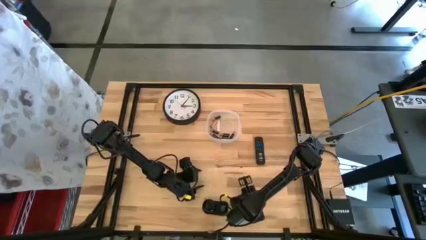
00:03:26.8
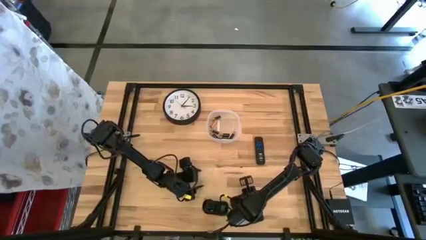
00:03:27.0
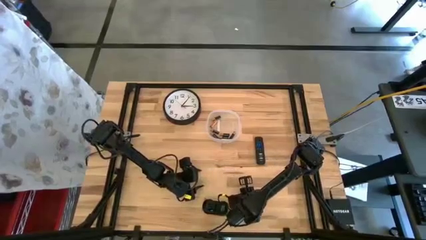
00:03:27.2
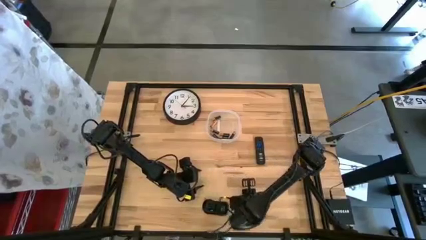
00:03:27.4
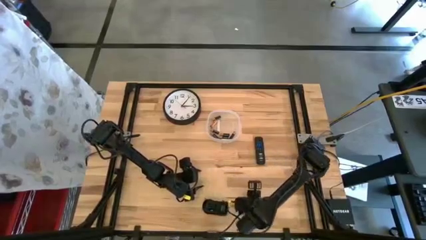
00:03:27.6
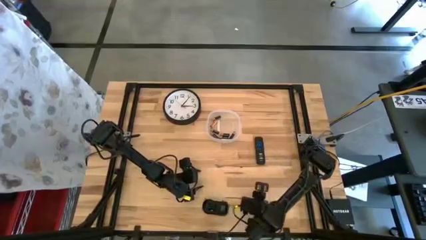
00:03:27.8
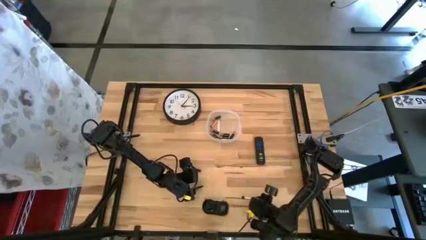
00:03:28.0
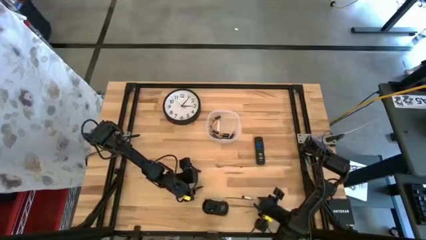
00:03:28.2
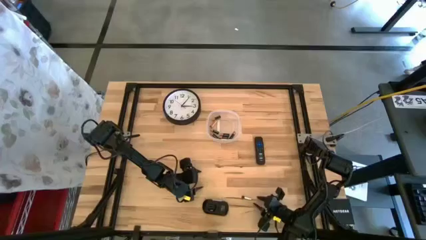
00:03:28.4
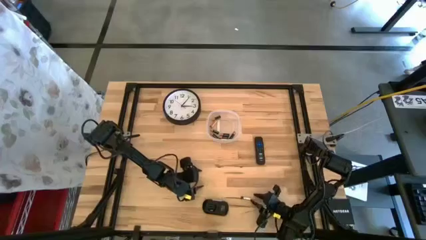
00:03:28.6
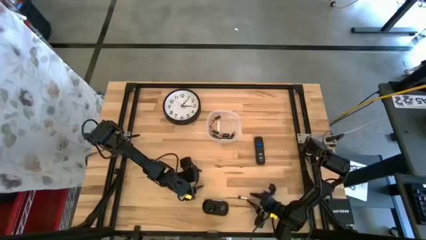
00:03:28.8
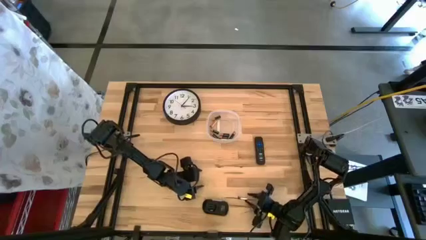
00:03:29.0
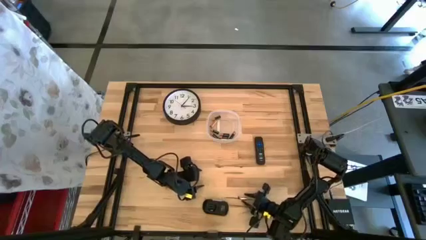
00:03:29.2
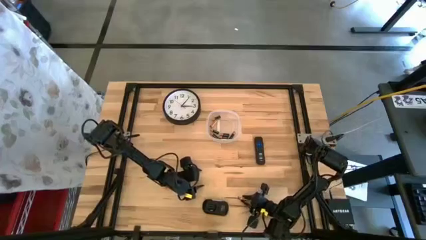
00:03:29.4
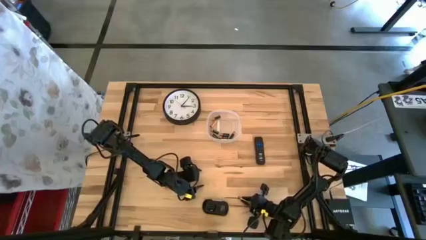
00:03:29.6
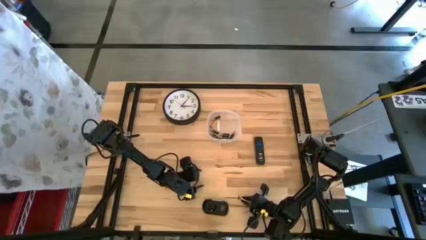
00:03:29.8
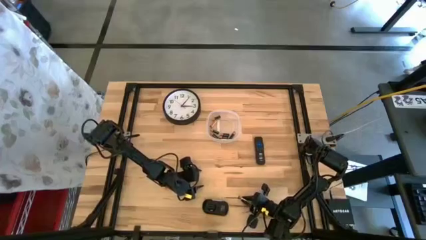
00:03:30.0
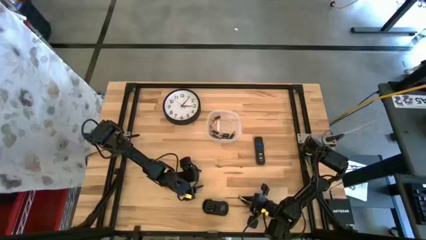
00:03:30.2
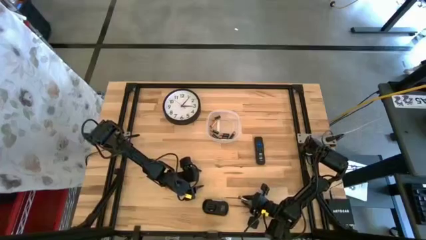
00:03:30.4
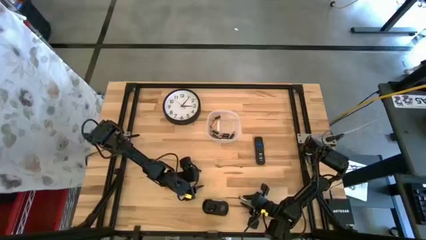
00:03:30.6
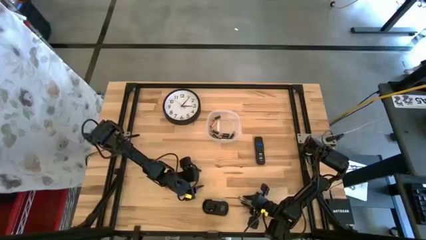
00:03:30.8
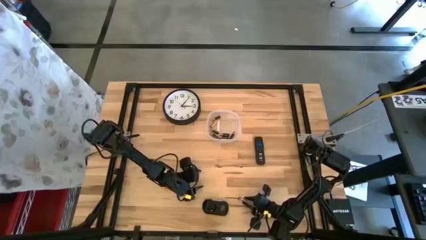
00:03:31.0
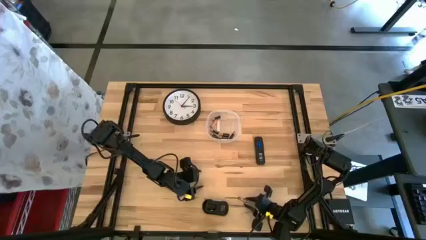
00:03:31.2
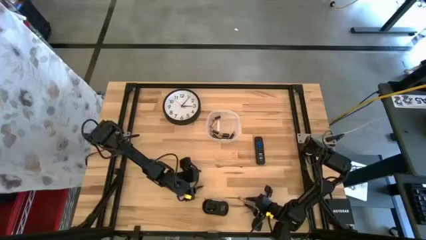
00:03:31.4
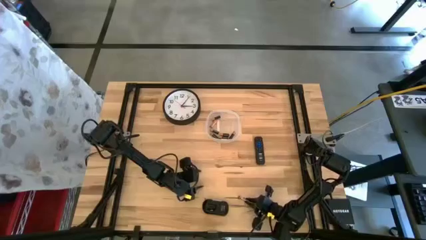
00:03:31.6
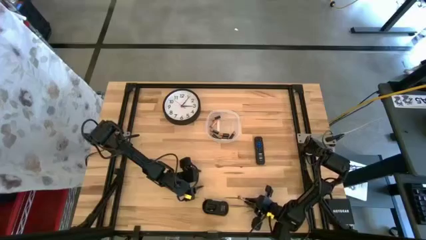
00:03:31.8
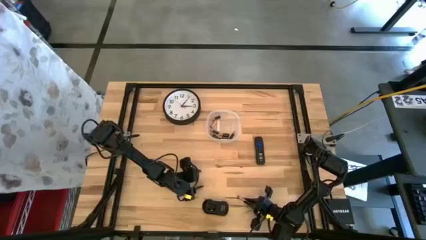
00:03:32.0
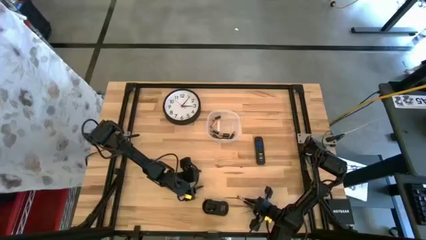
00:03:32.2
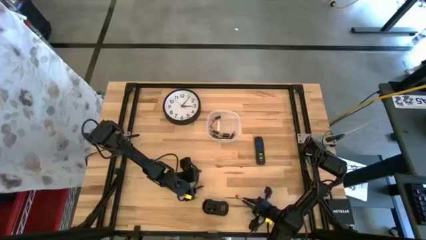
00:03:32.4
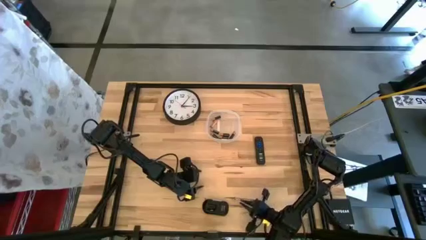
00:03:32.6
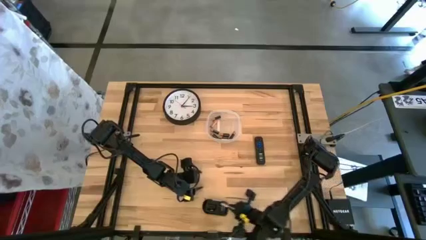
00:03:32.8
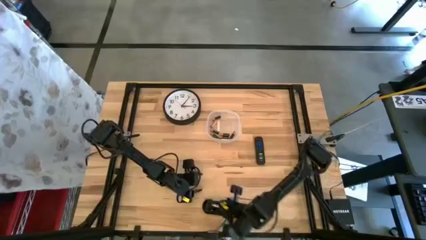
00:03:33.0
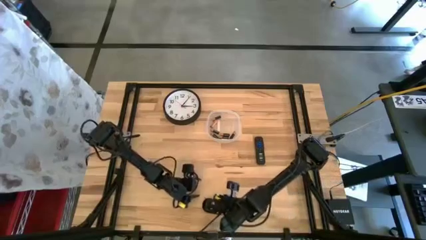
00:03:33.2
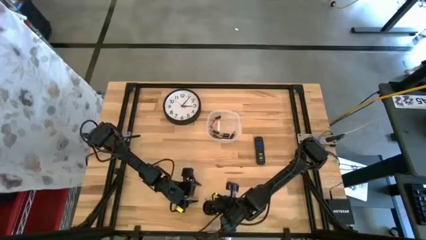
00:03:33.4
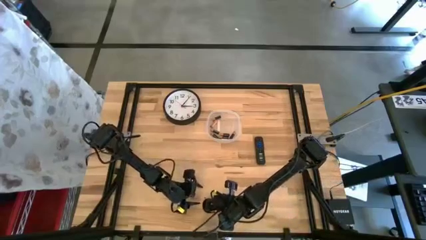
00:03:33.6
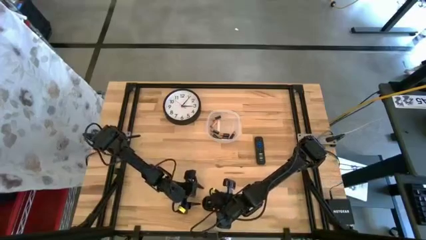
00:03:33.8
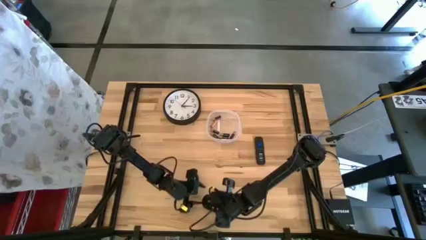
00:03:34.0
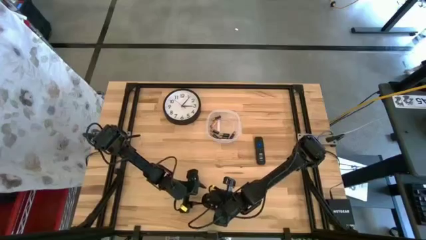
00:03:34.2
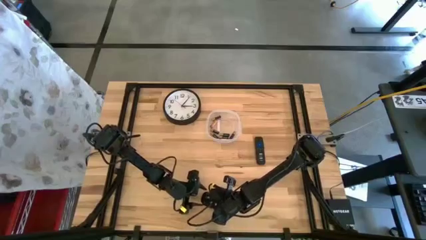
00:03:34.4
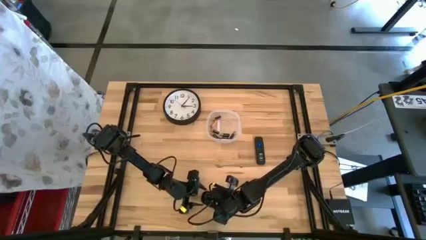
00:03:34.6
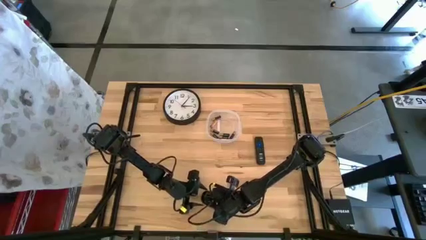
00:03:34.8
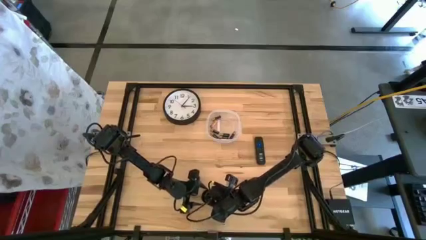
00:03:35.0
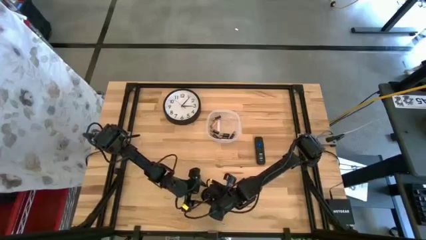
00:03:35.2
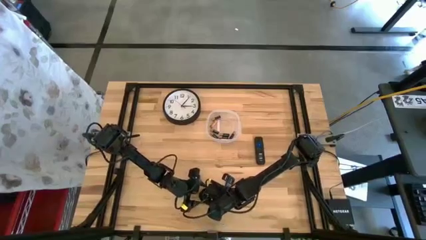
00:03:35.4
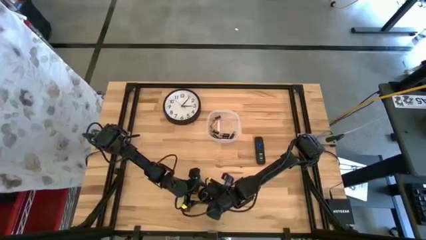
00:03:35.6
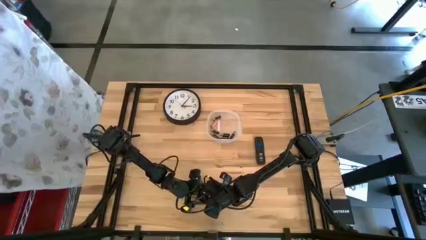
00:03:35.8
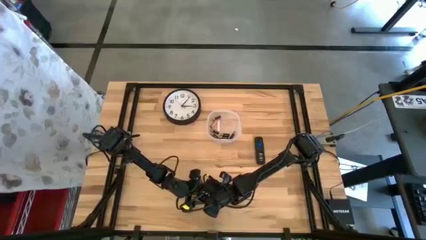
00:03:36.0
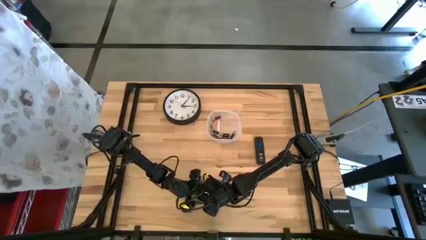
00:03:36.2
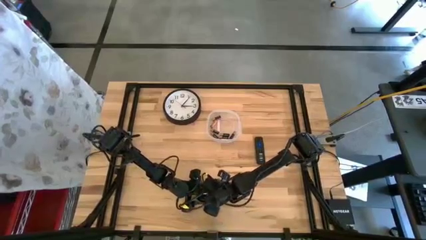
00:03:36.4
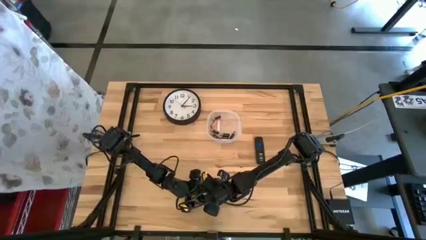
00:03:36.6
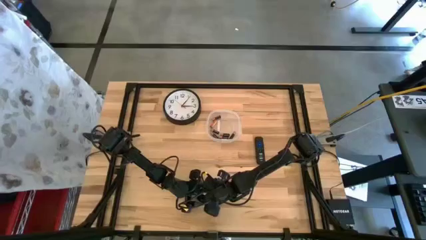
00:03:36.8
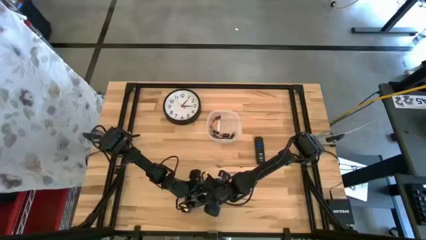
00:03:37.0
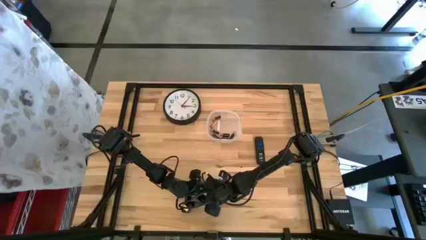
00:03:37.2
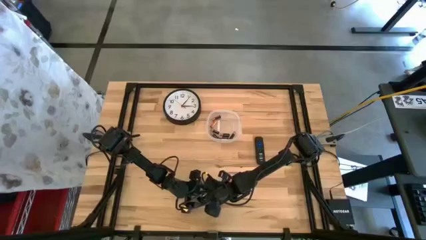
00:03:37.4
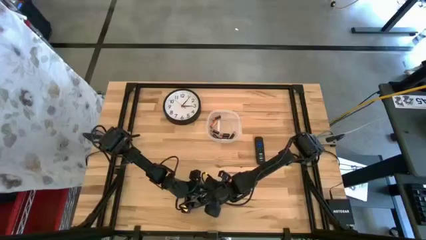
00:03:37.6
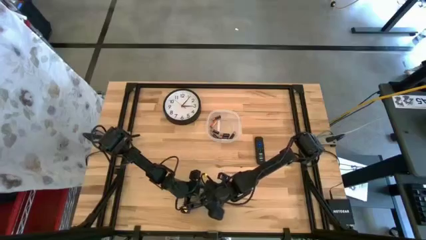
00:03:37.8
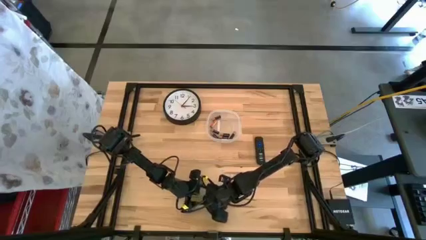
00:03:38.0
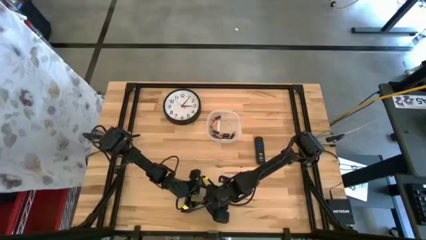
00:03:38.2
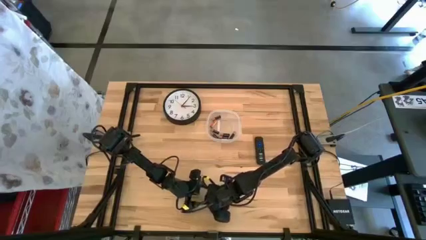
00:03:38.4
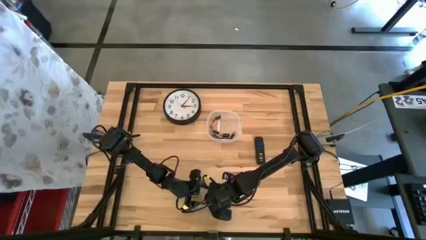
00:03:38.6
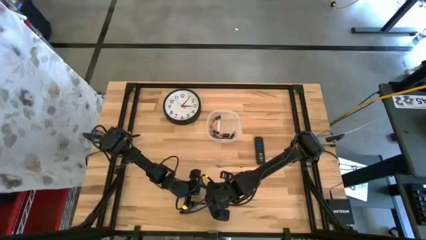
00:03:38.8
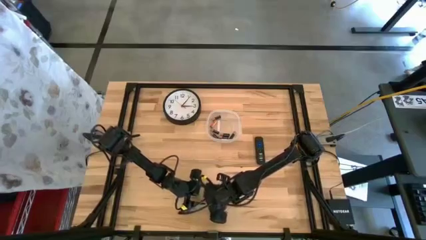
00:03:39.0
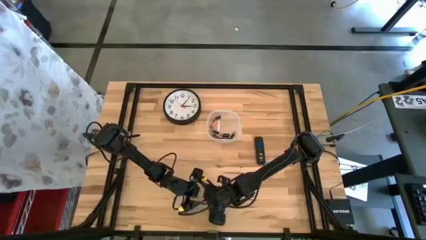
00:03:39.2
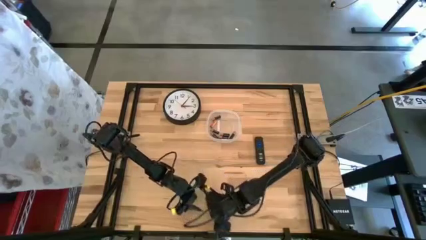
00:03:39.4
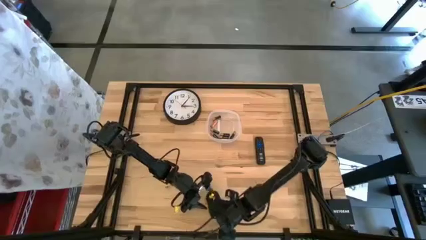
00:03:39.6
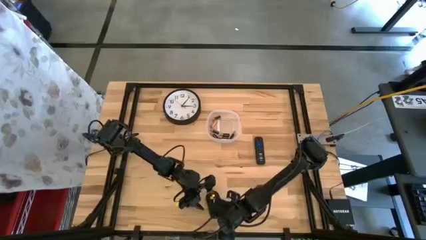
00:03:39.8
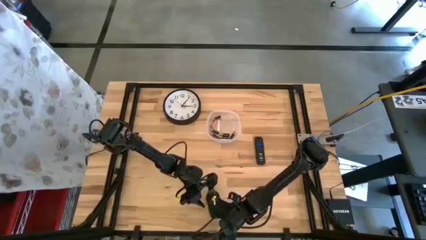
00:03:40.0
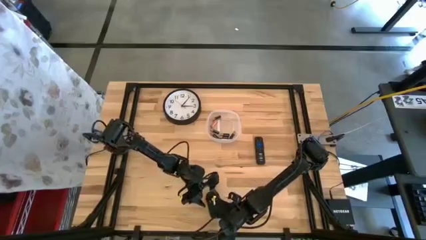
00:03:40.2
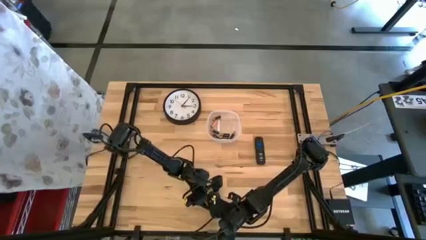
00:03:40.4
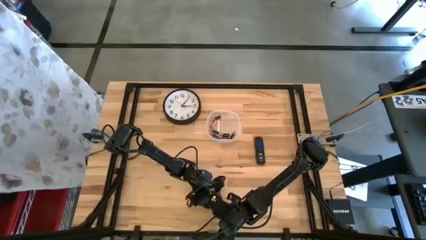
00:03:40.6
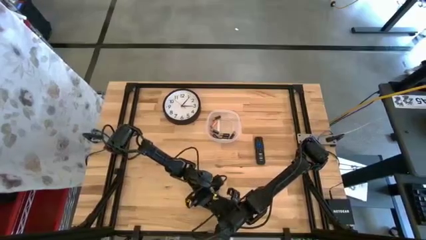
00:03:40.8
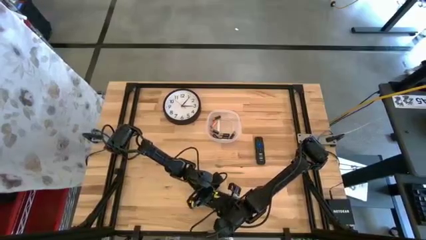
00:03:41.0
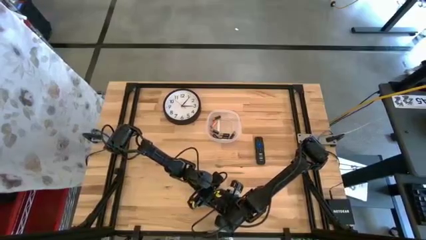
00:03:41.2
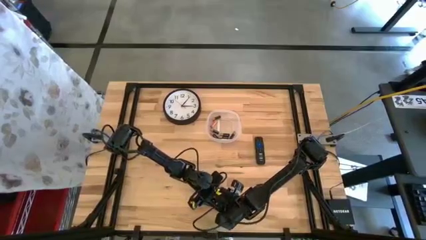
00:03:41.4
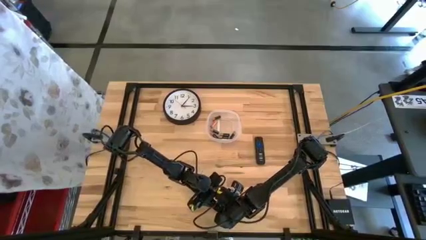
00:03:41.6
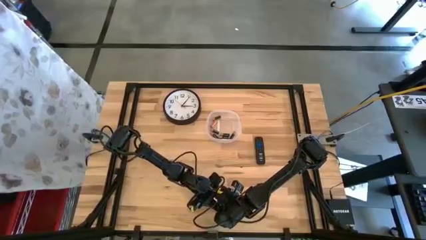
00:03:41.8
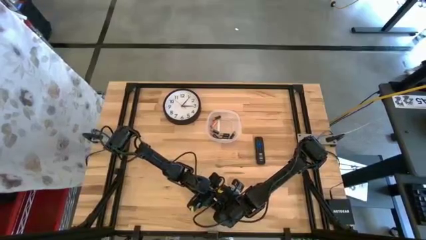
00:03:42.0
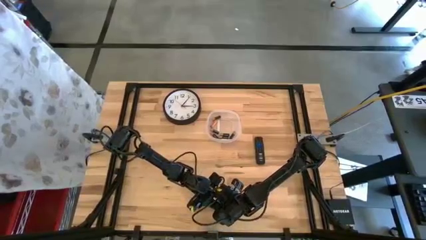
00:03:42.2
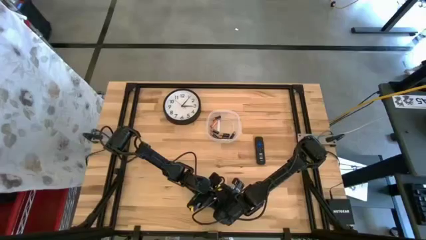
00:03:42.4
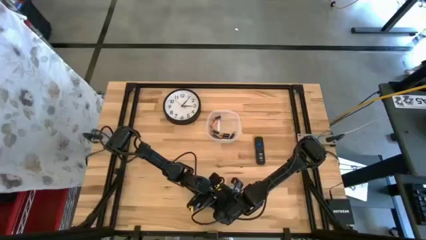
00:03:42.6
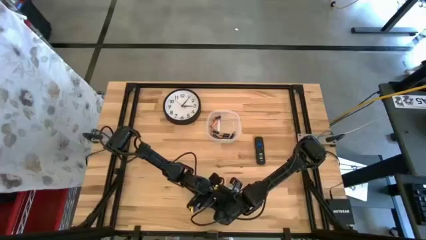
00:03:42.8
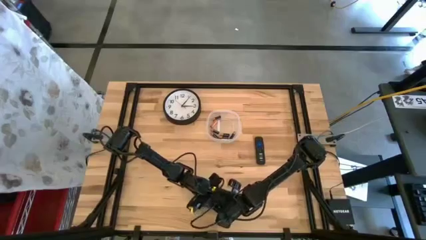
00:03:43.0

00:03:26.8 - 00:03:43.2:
Task: Insert battery
Insert the silver battery into the computer mouse
